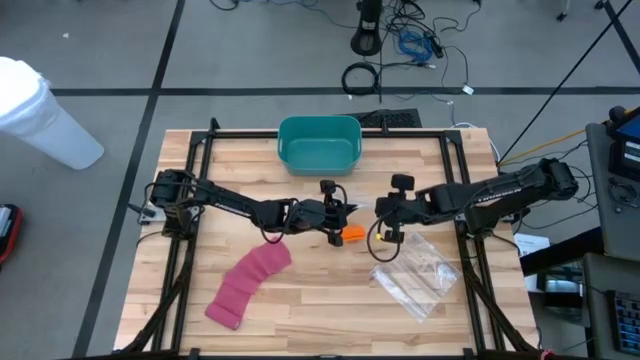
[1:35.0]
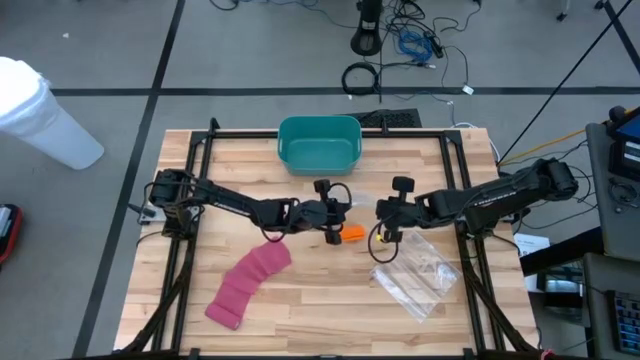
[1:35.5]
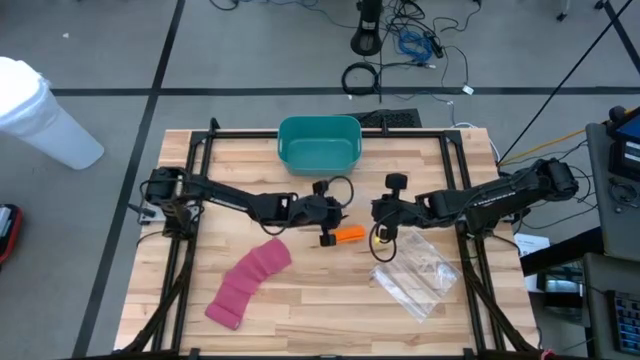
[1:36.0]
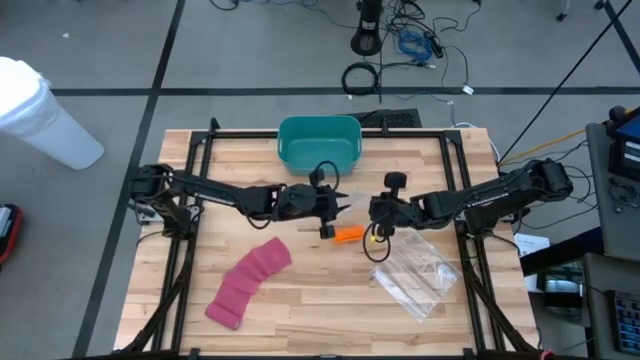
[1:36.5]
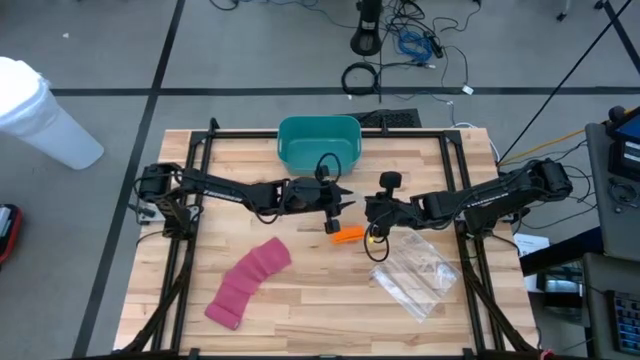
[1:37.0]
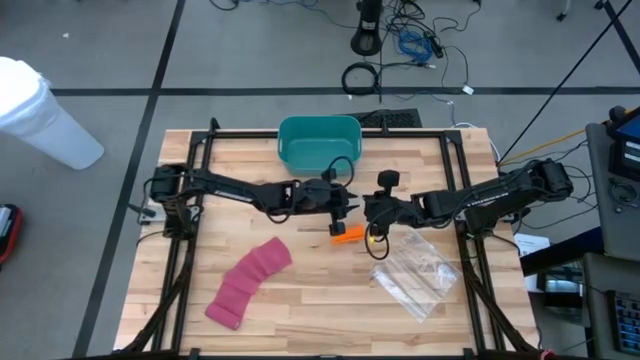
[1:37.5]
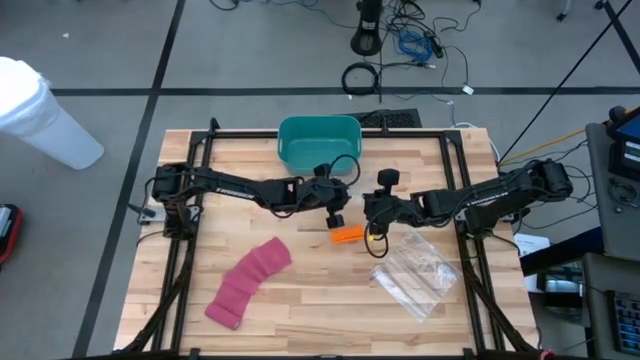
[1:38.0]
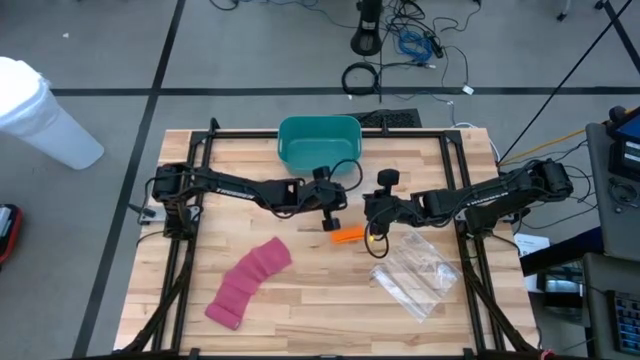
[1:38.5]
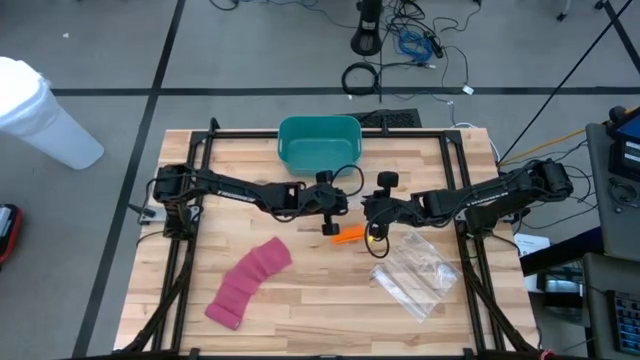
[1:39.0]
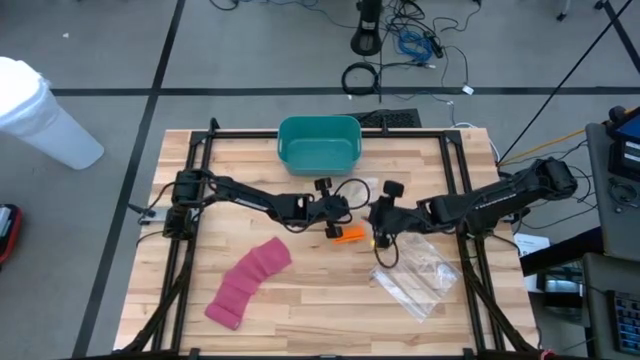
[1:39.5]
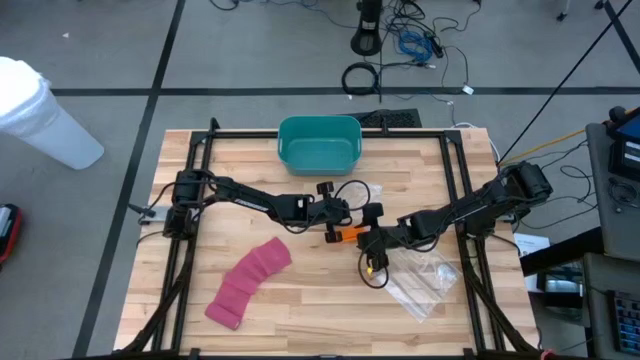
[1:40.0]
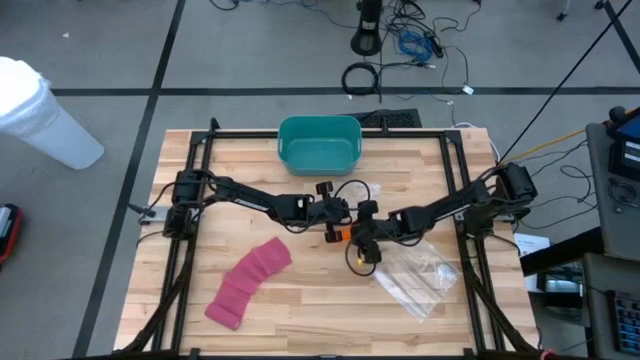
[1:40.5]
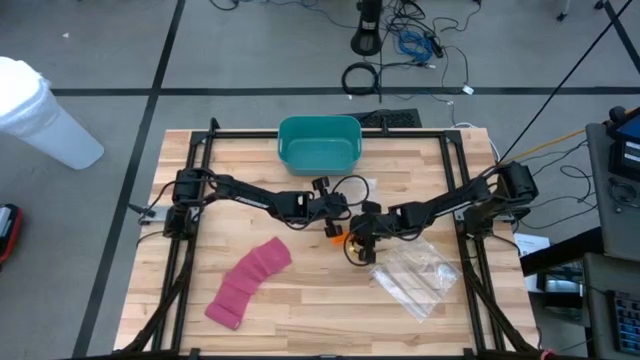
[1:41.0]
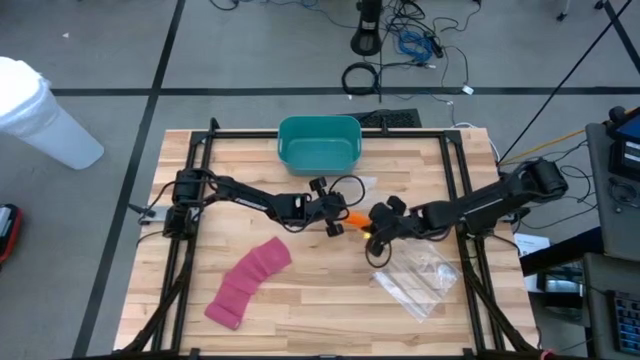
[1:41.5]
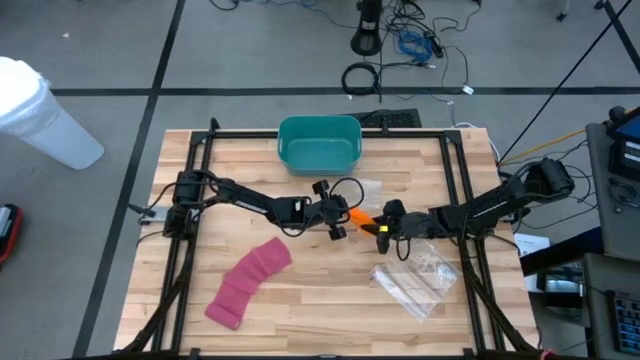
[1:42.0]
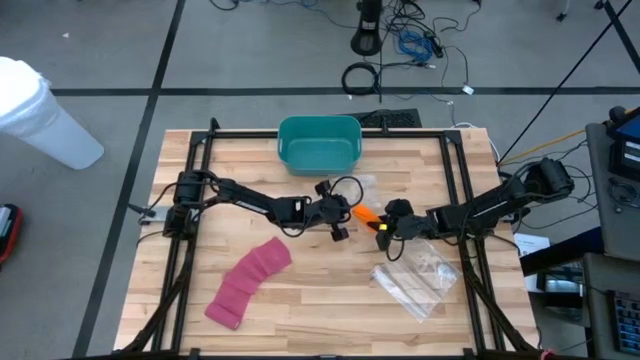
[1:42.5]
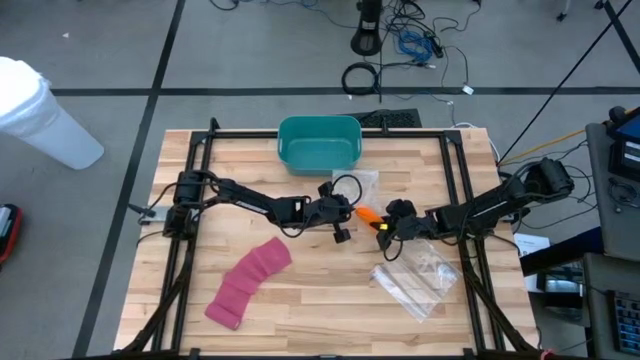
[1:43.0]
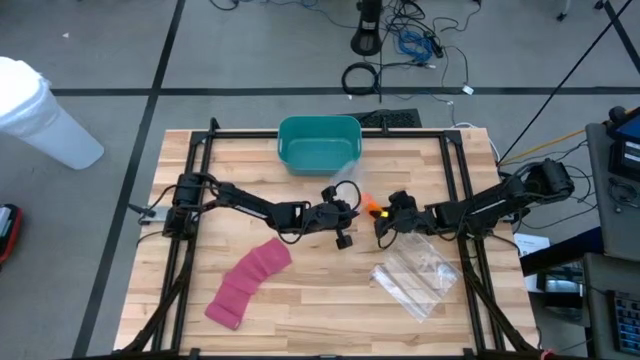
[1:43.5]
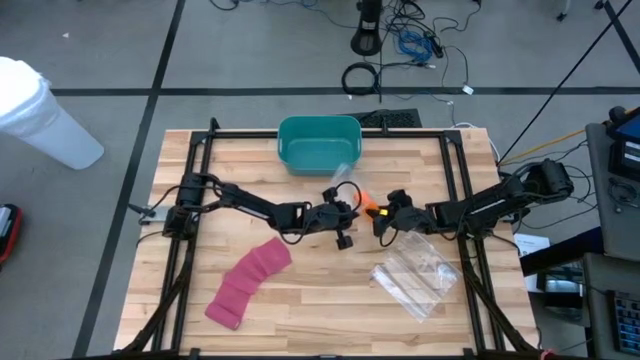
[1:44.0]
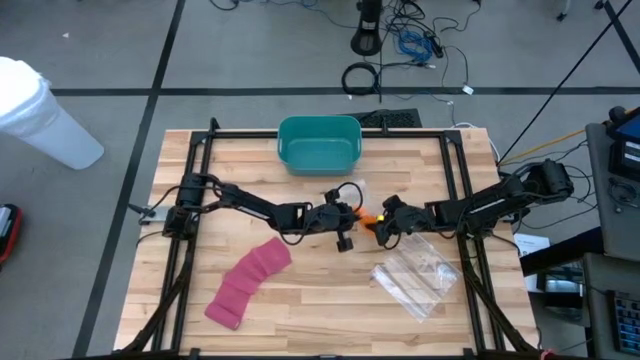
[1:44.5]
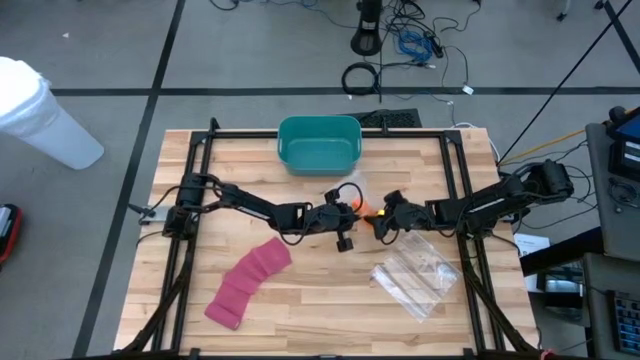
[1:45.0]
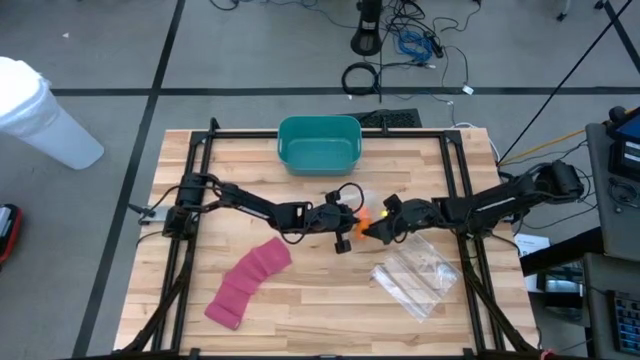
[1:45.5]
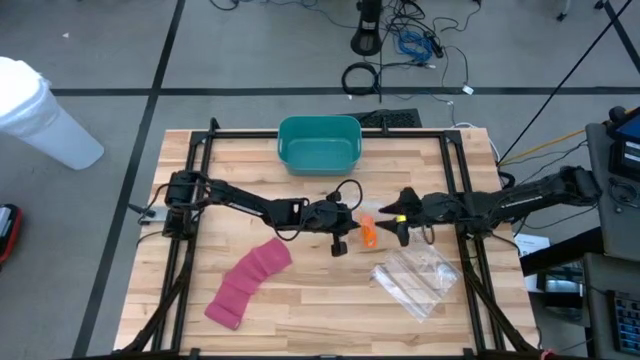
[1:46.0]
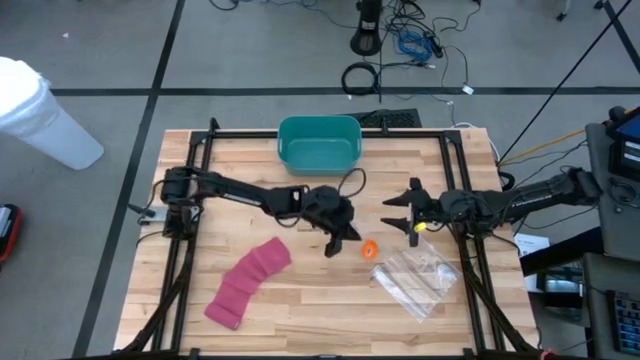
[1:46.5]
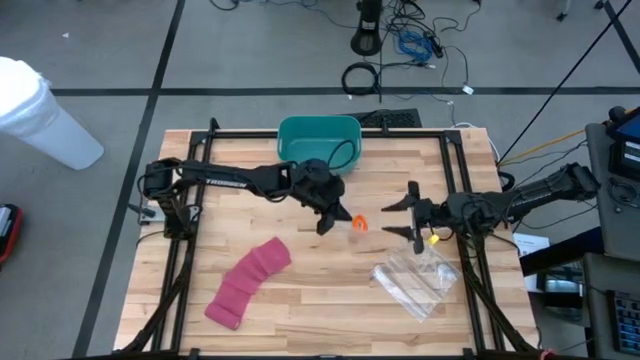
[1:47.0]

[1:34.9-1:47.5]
Task: Roll bandage
Put the orange bandage into the transparent zip bag

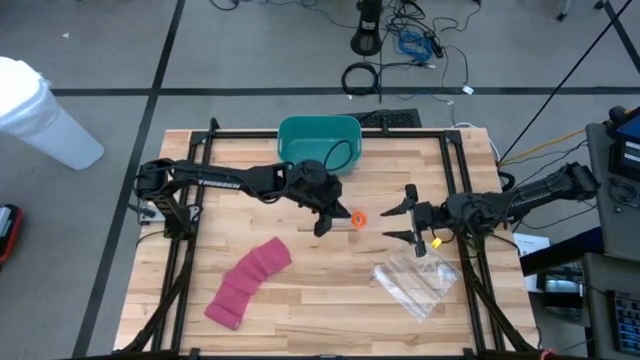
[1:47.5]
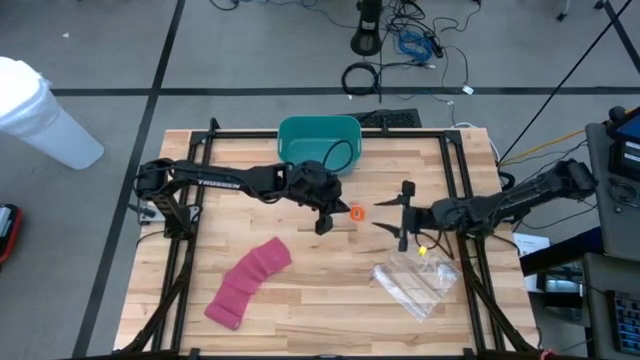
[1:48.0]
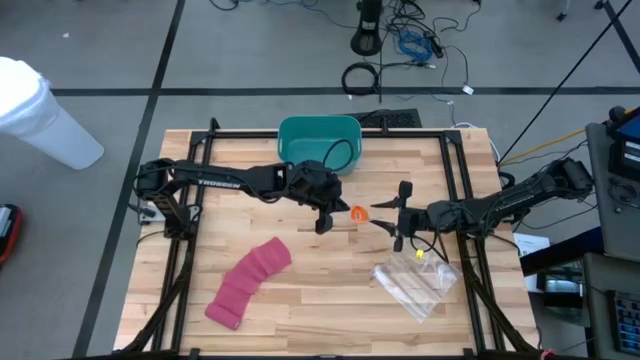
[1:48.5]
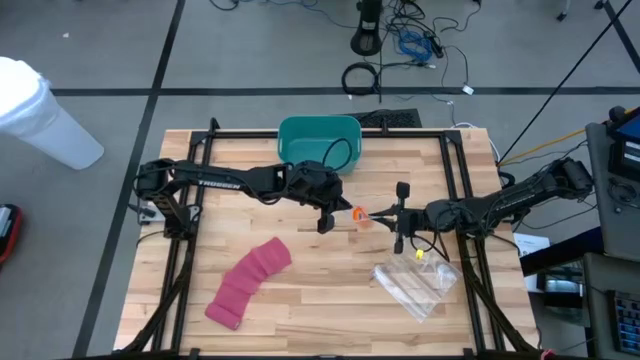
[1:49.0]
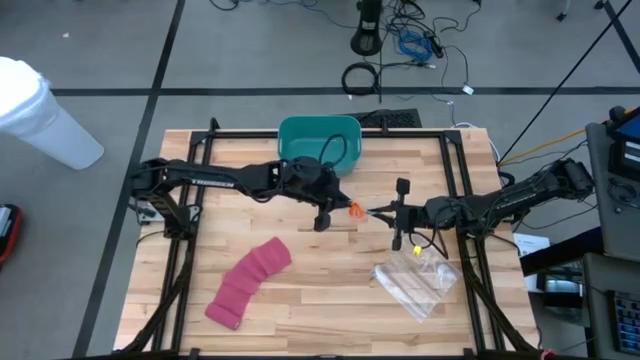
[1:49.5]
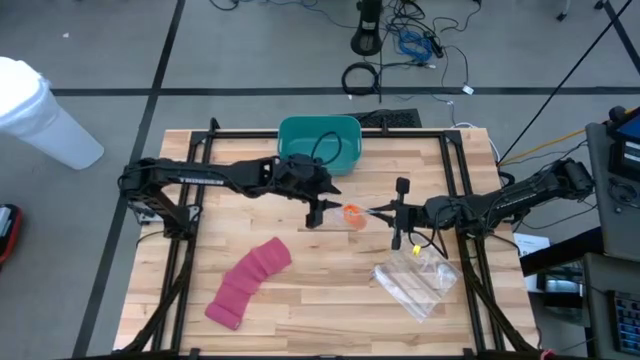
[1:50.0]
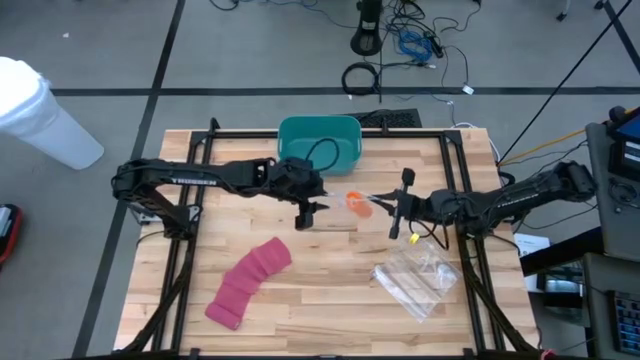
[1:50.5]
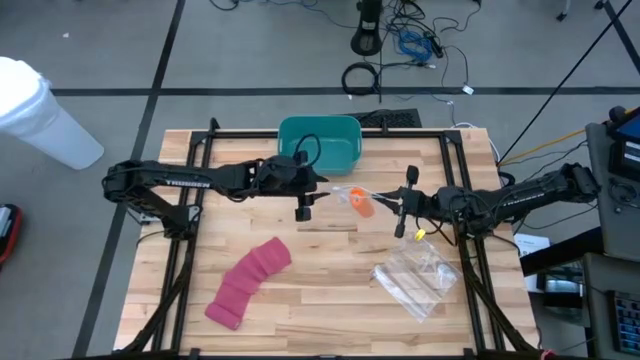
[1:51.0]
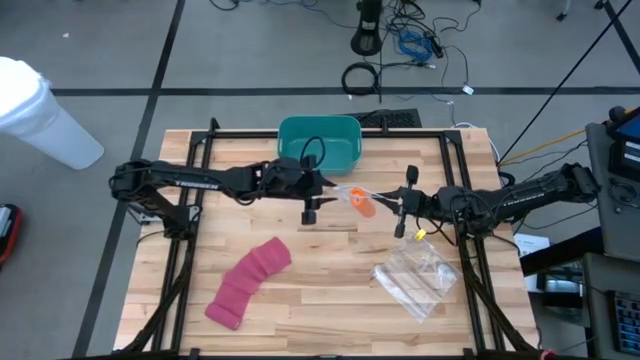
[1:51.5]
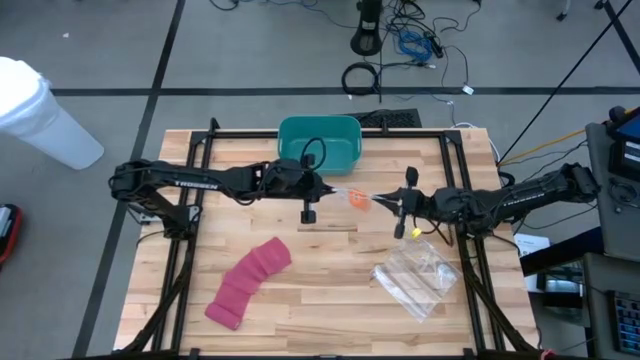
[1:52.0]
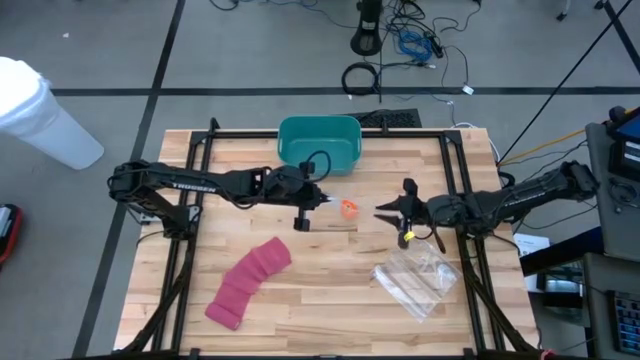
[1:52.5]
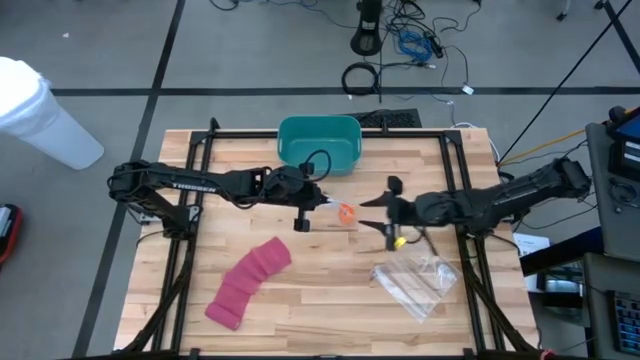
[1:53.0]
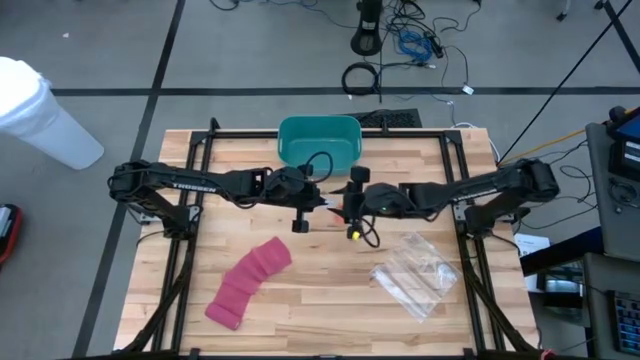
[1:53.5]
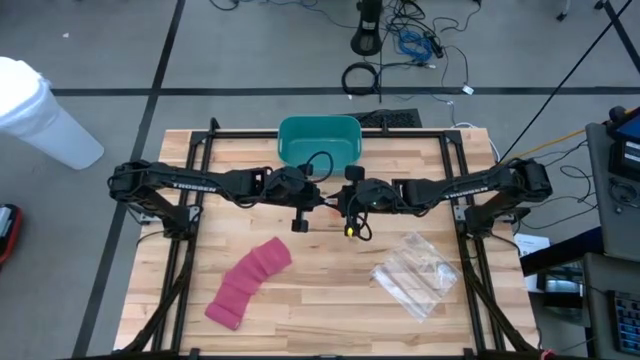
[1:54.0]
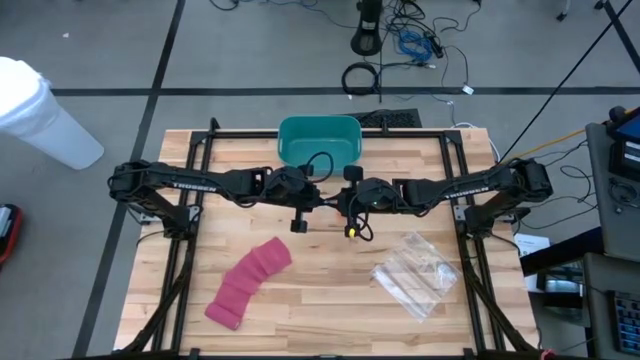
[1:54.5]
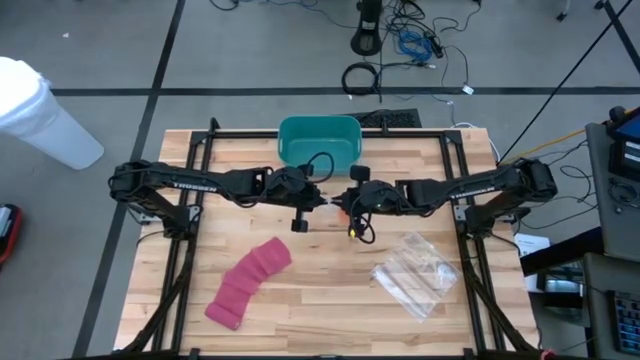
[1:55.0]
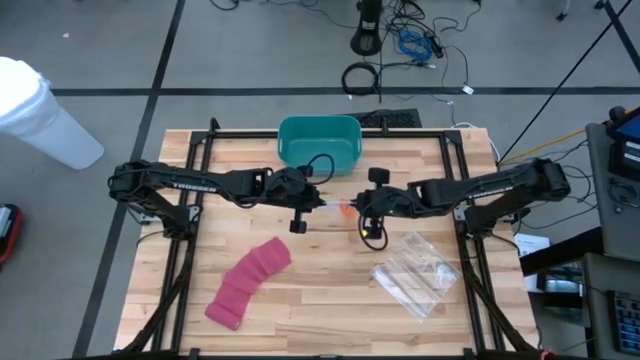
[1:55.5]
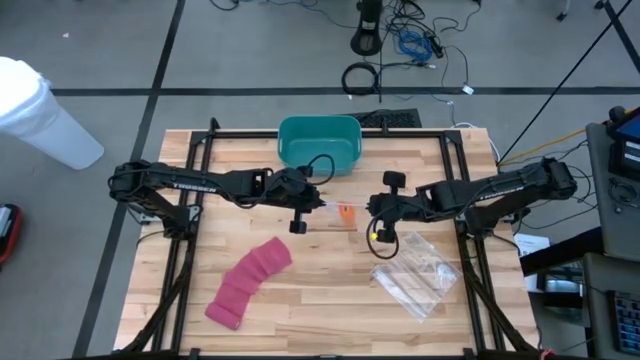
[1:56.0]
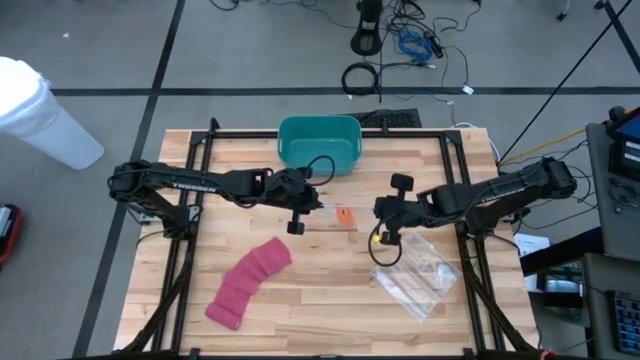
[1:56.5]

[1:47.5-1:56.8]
Close the transparent zip bag
